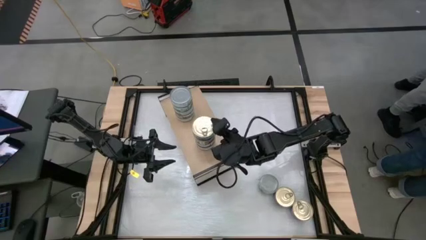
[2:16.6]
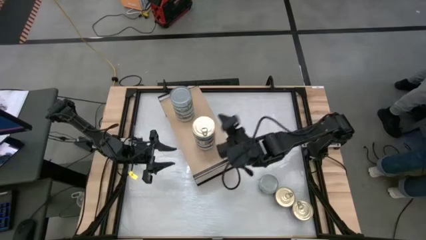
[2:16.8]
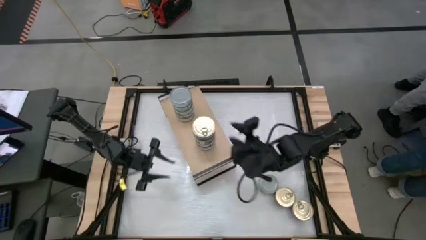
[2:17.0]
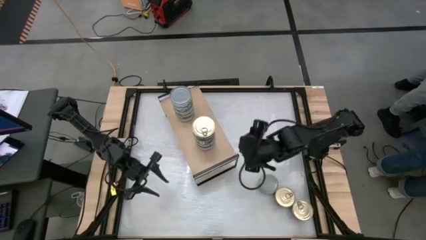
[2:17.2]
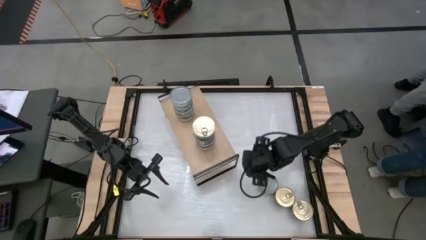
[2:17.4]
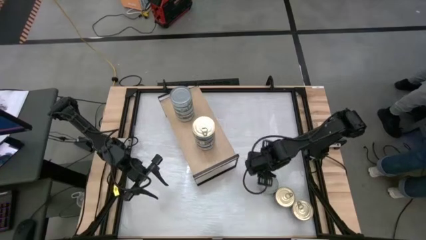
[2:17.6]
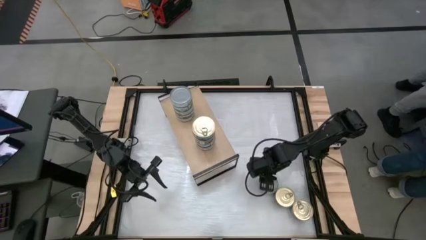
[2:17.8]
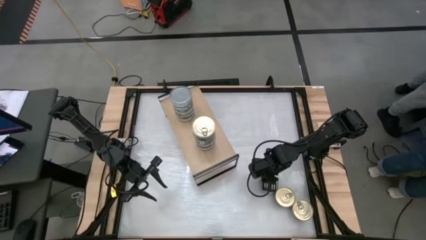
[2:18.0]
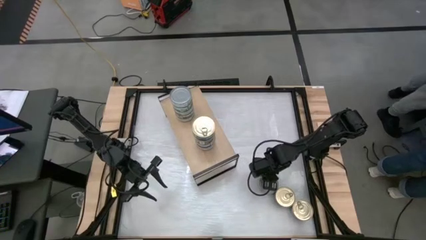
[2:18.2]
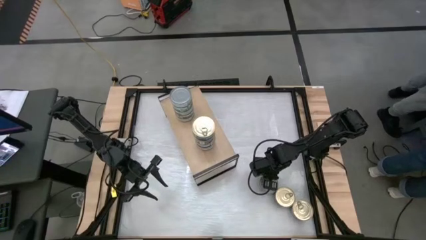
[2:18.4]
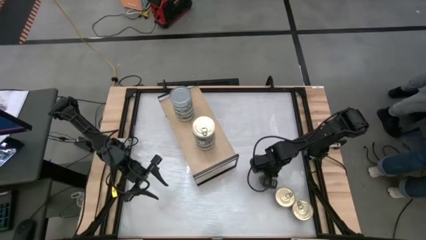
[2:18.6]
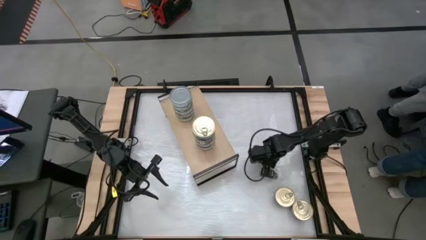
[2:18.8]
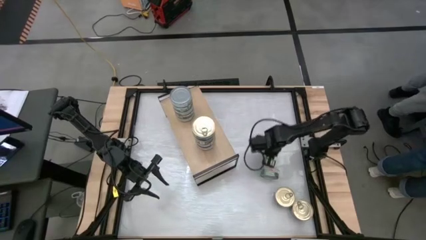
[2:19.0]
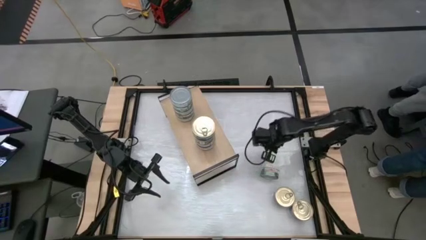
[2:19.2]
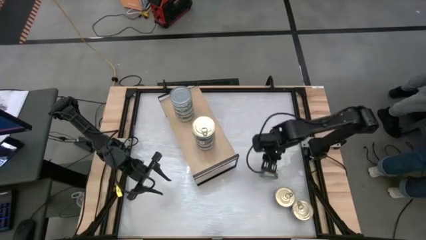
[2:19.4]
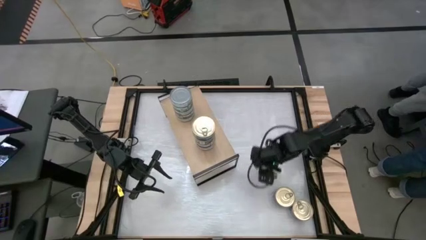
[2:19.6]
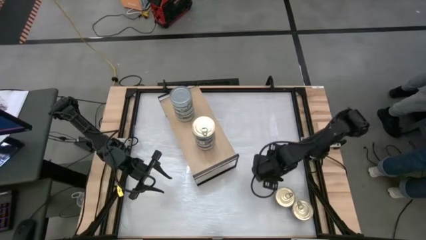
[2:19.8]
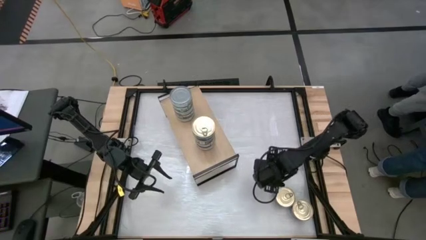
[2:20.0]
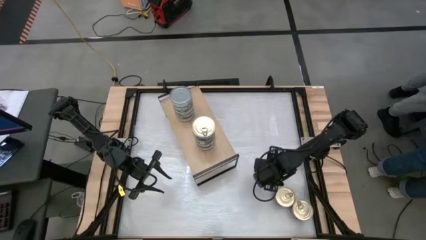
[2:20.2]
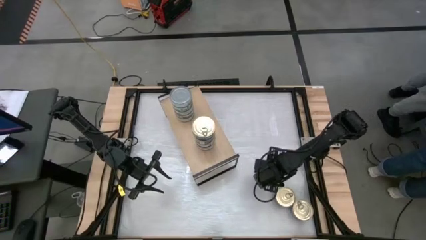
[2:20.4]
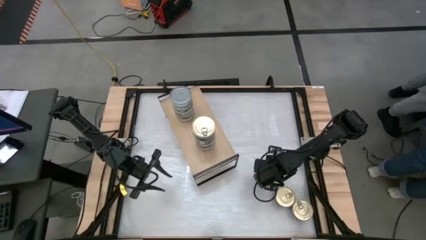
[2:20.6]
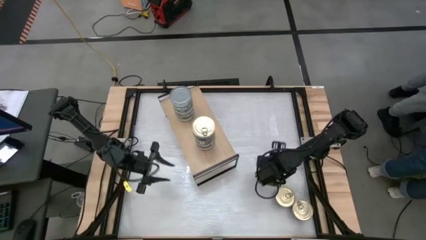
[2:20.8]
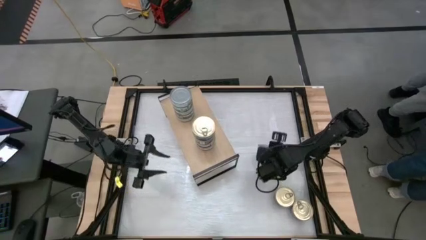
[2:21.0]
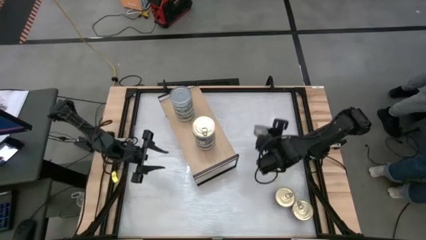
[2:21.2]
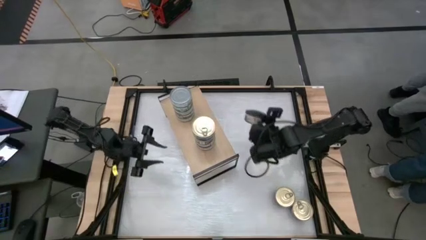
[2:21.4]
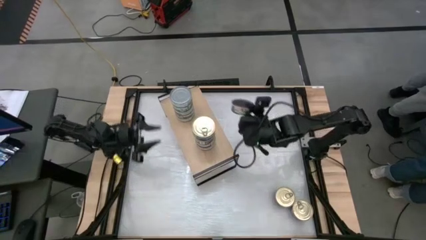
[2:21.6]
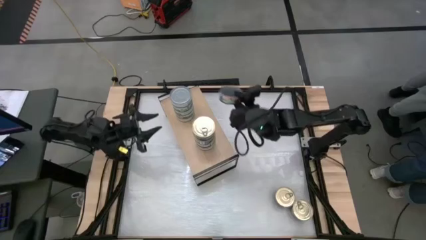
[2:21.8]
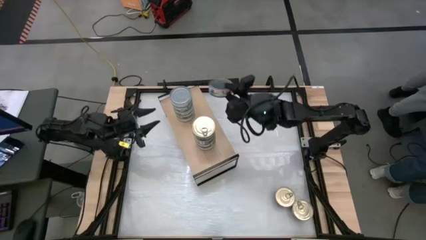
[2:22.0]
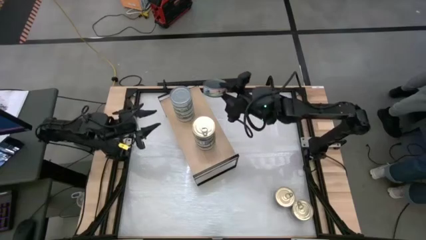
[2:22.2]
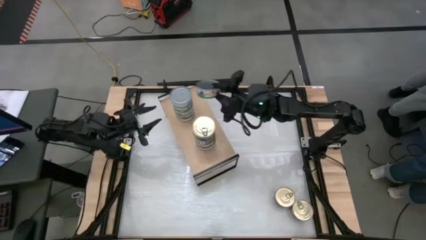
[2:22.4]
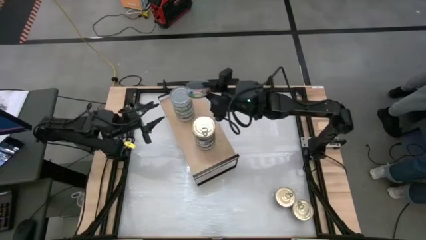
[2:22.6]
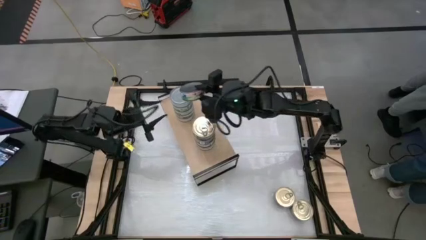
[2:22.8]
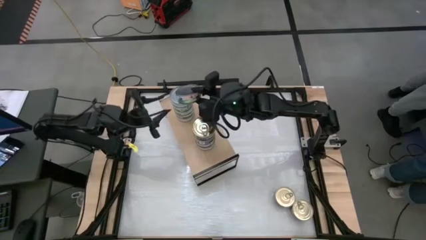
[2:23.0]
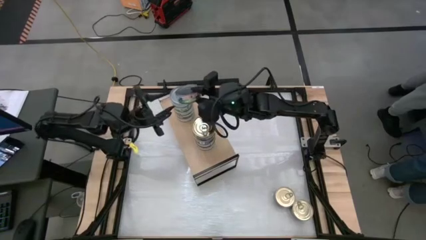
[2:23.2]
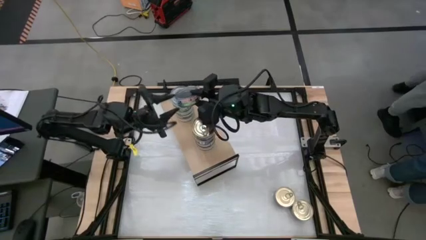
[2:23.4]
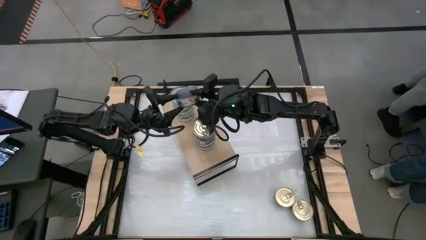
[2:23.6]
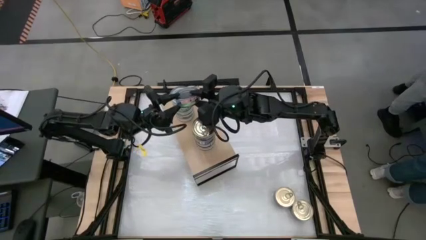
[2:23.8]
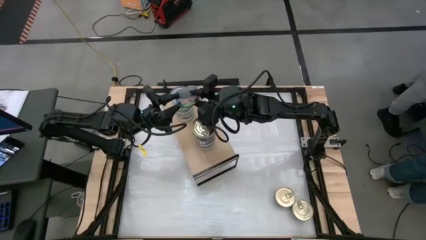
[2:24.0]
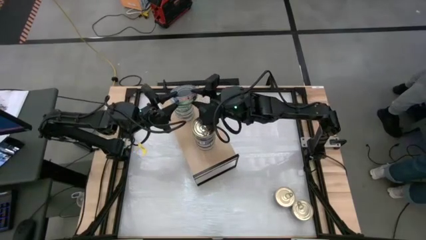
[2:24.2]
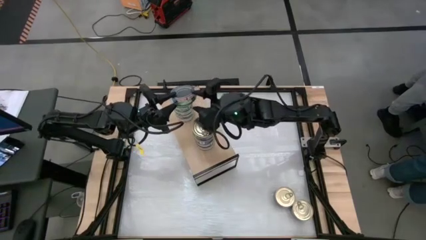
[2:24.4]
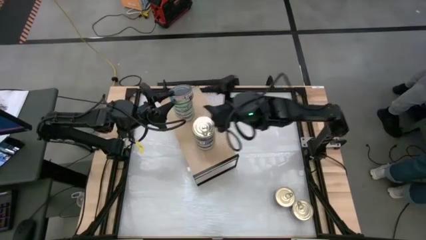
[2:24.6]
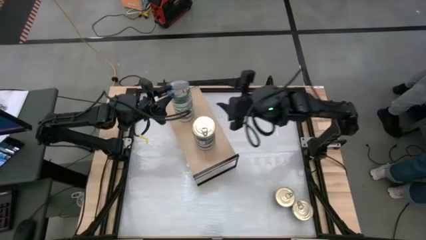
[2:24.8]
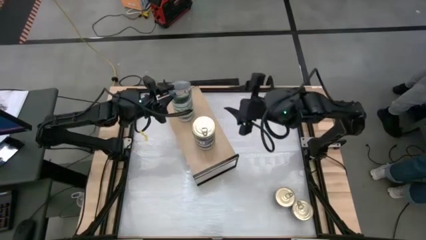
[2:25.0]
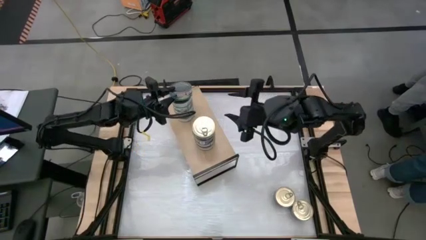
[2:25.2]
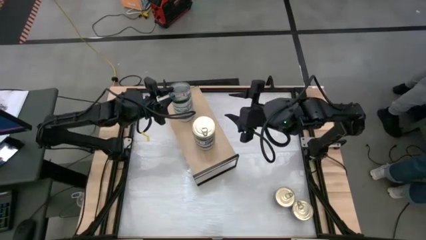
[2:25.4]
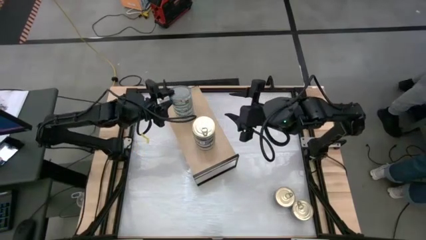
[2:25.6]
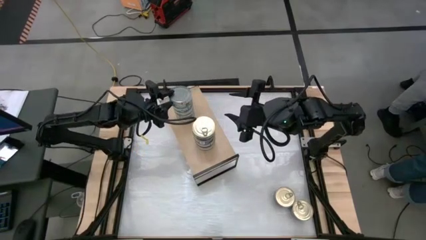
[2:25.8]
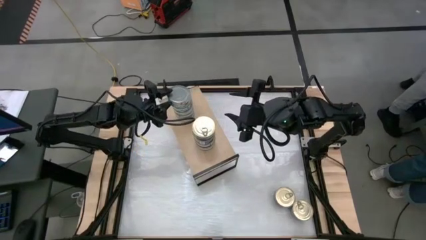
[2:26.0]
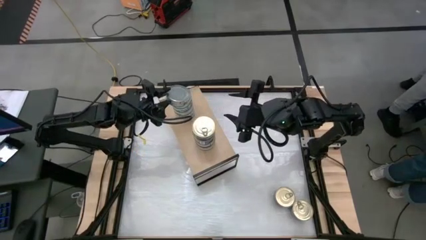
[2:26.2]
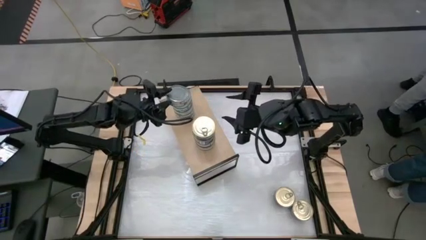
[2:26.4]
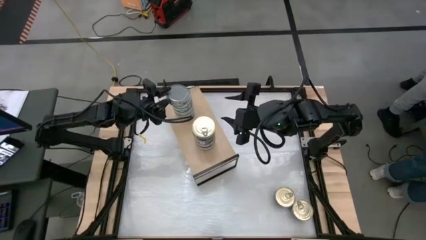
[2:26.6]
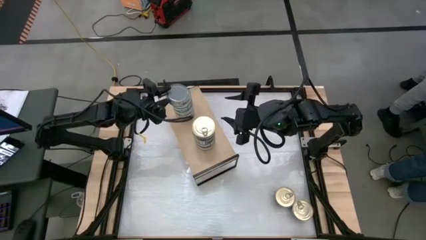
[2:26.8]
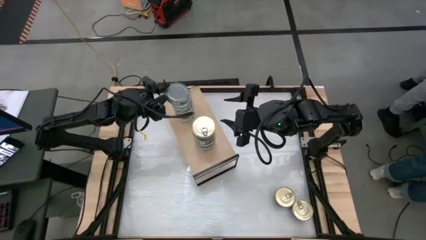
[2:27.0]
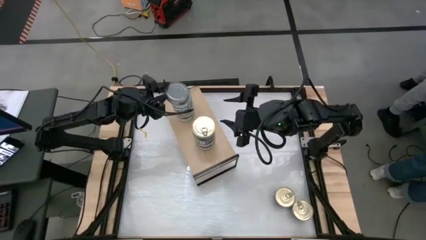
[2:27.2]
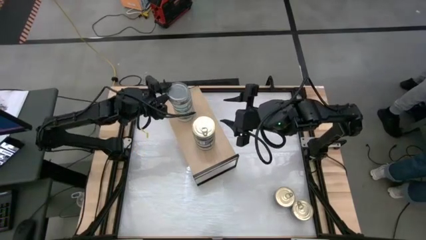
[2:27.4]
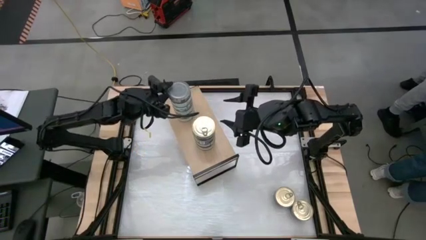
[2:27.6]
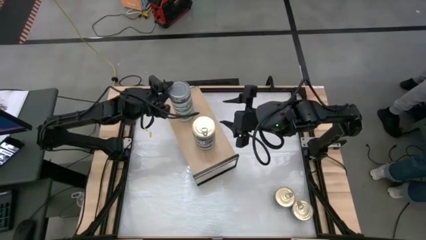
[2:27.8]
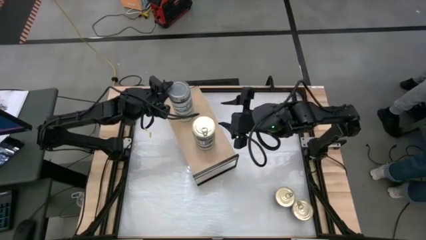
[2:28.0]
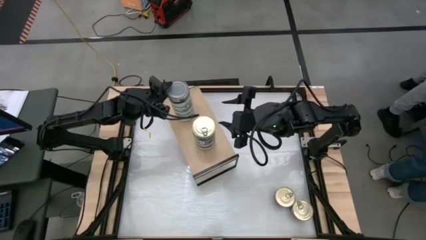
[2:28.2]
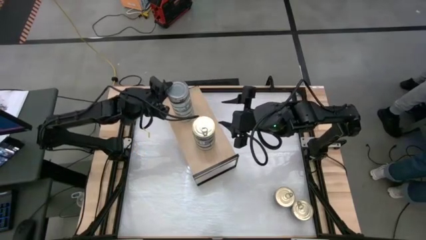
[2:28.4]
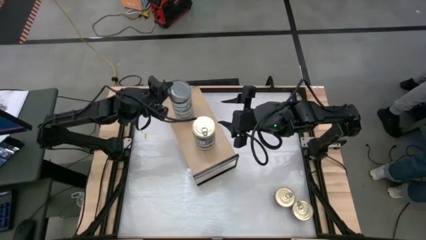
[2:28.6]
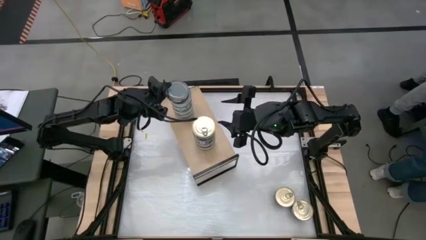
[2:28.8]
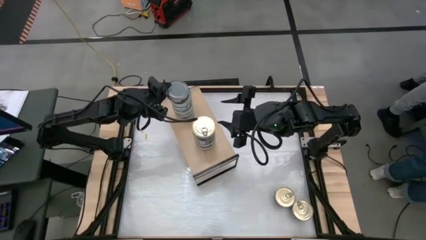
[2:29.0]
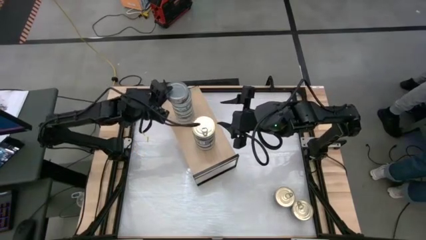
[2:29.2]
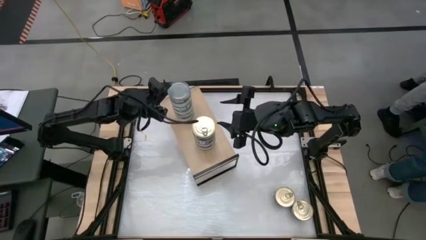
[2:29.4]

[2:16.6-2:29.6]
Task: Stack canned seafood by type on shelf
Stack the green tuna can on top of the other green tuna can on the shelf
